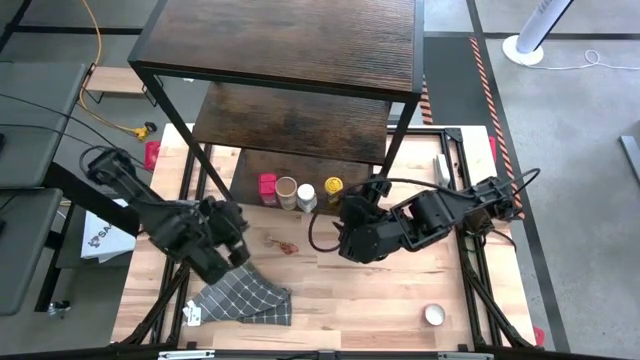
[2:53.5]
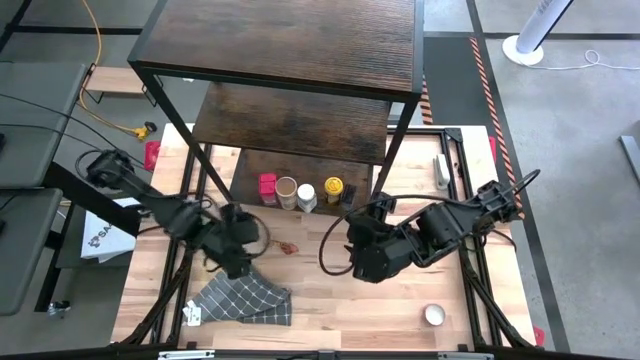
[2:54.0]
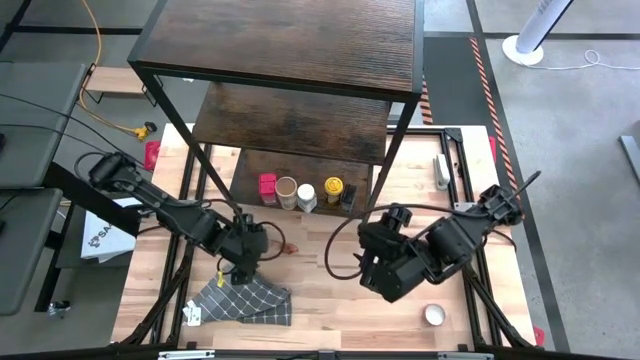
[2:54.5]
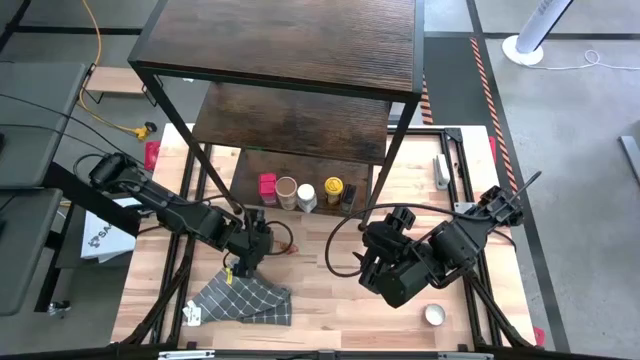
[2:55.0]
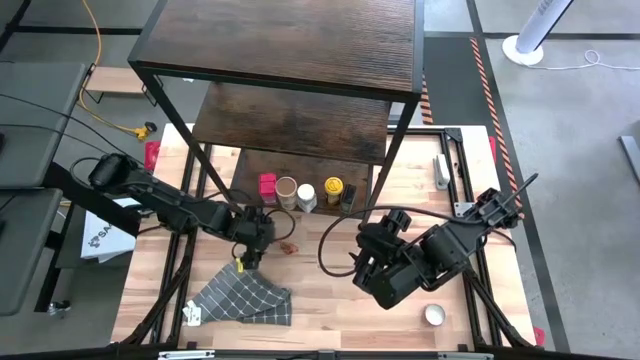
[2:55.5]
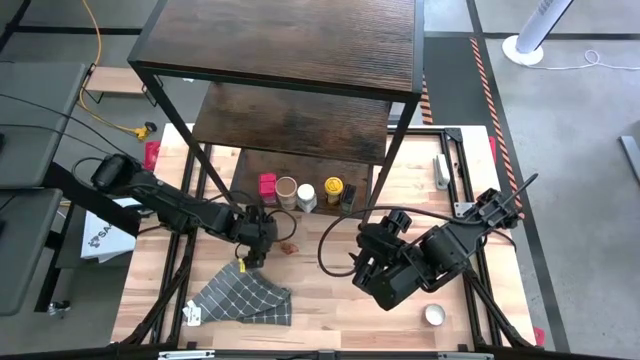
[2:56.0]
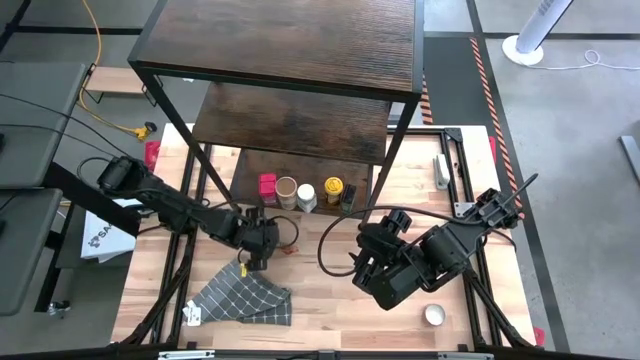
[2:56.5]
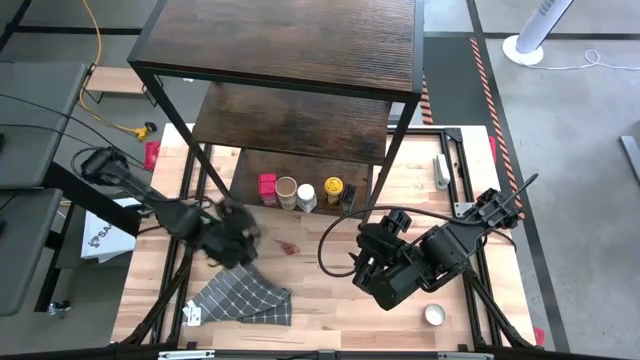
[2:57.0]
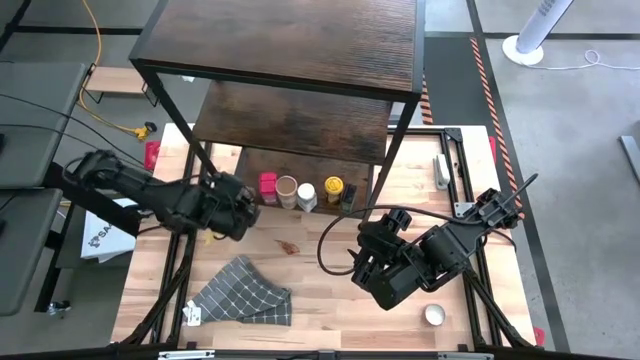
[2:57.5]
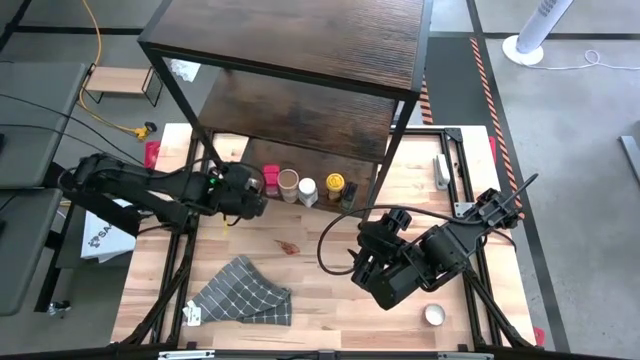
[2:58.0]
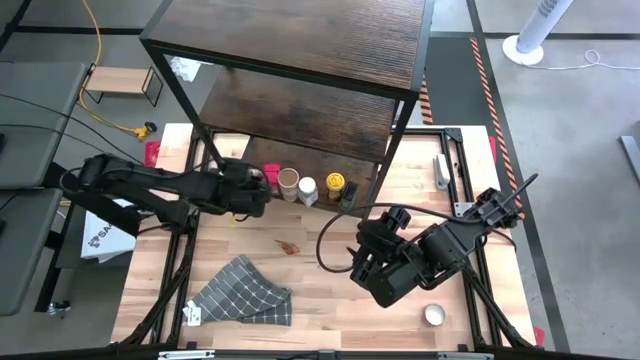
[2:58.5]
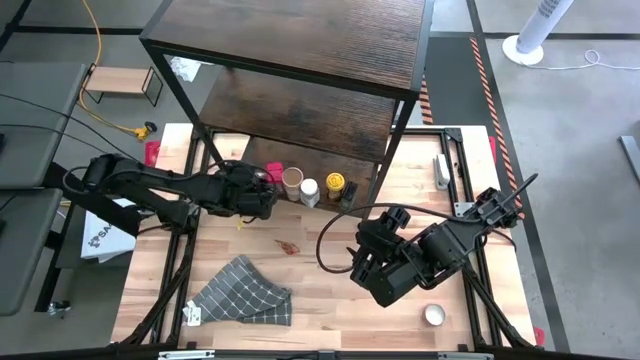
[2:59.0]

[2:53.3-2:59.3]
Task: Shelf spices
Put the brown seasoning bottle on the shelf

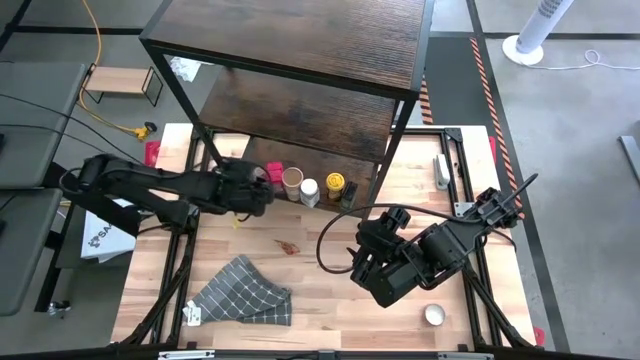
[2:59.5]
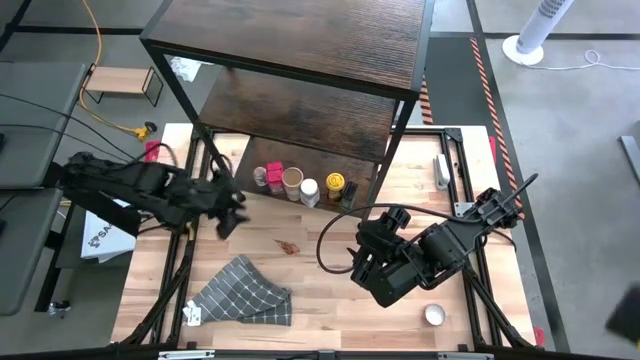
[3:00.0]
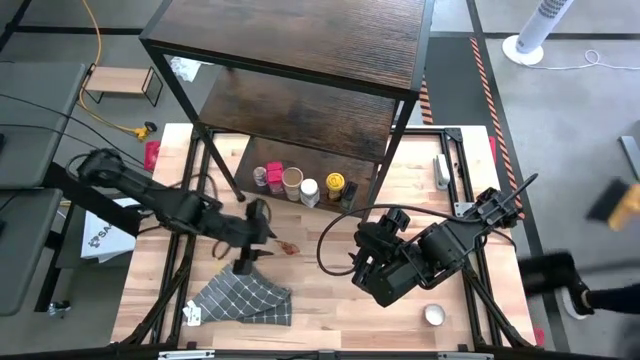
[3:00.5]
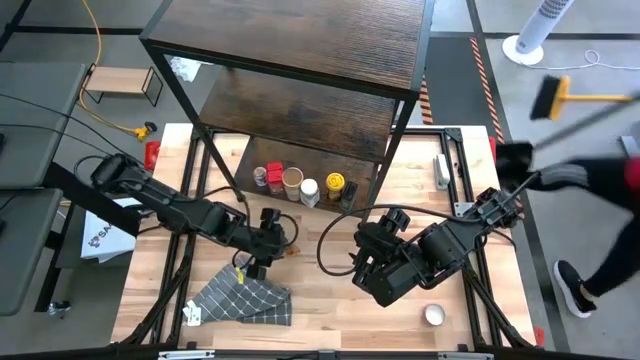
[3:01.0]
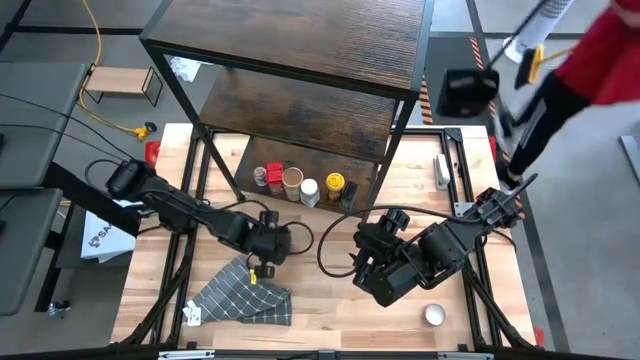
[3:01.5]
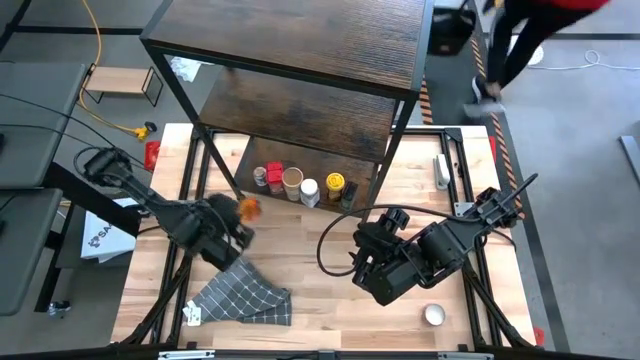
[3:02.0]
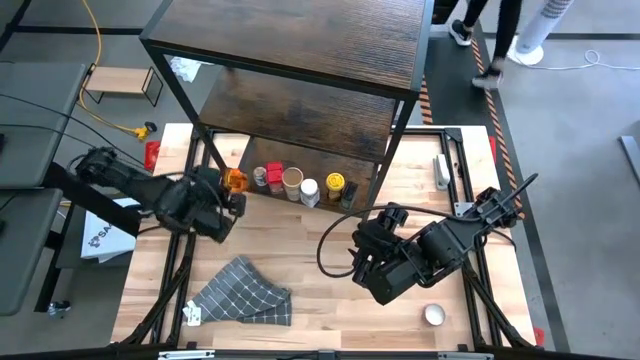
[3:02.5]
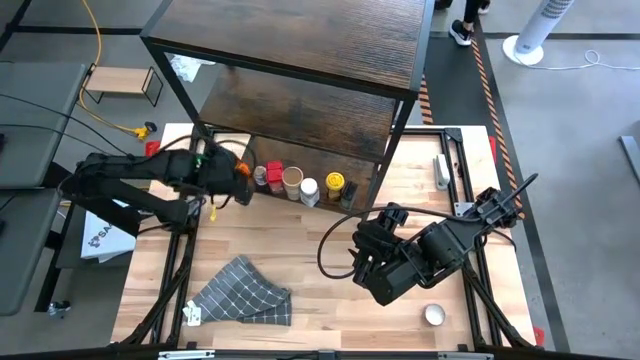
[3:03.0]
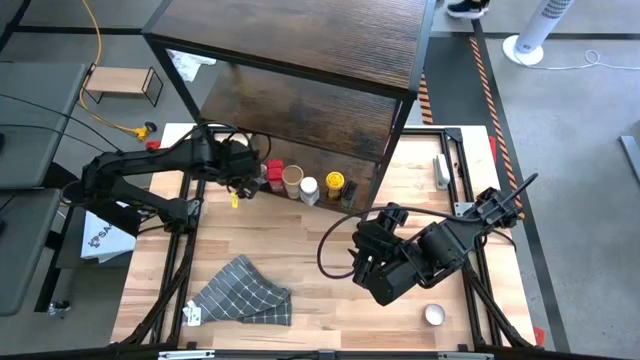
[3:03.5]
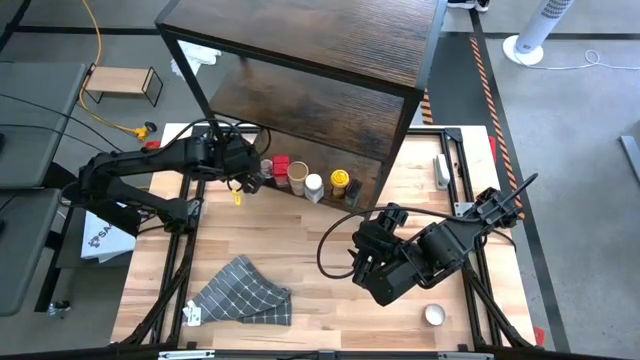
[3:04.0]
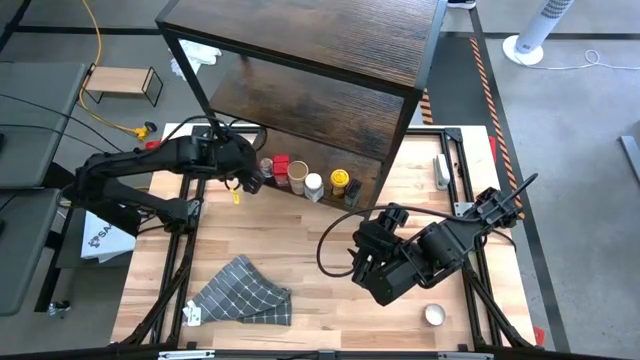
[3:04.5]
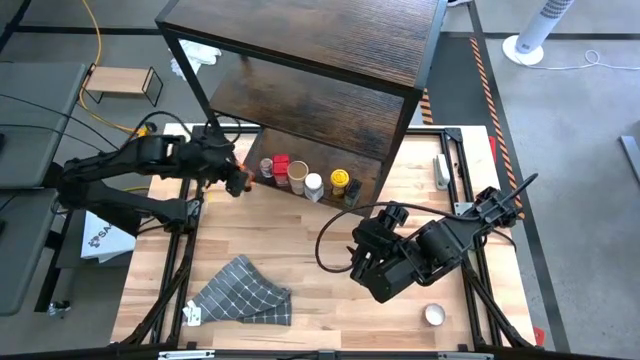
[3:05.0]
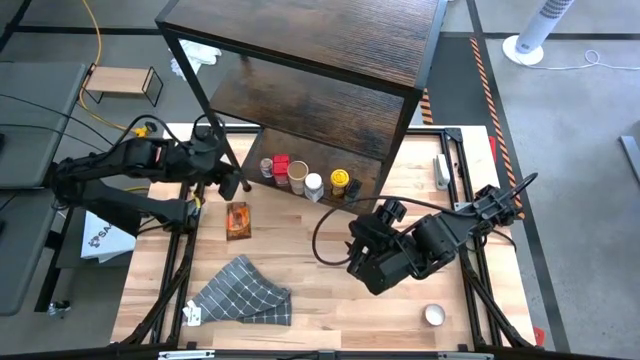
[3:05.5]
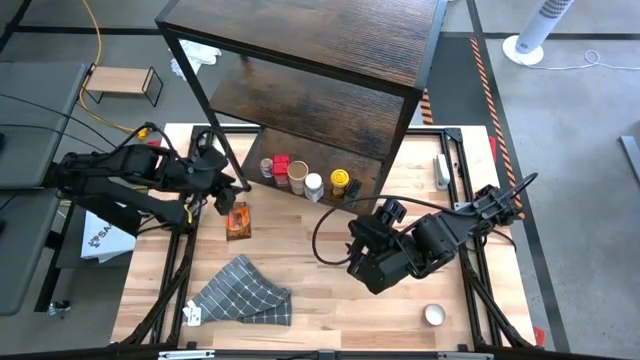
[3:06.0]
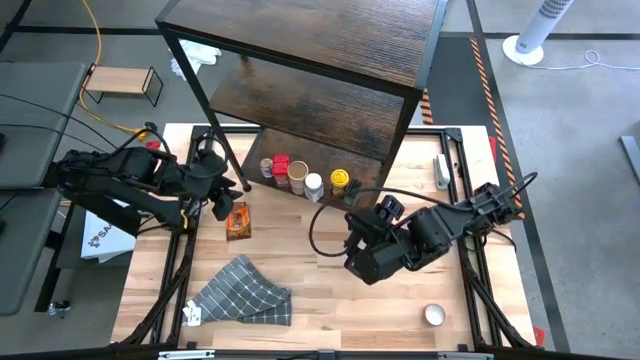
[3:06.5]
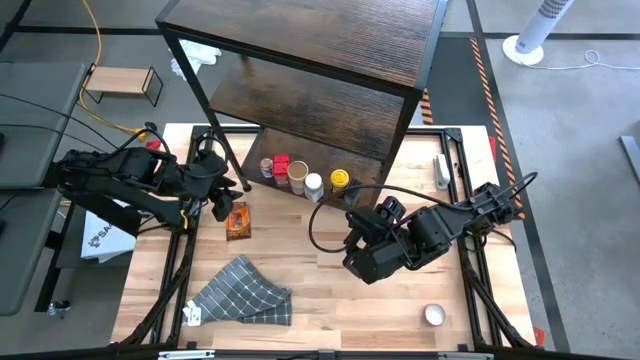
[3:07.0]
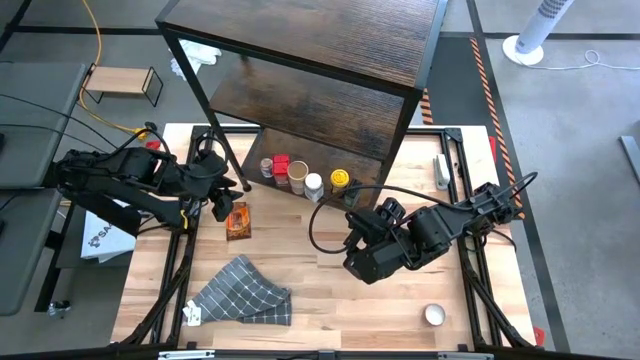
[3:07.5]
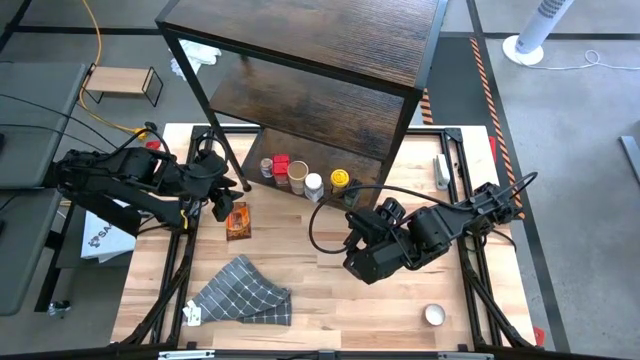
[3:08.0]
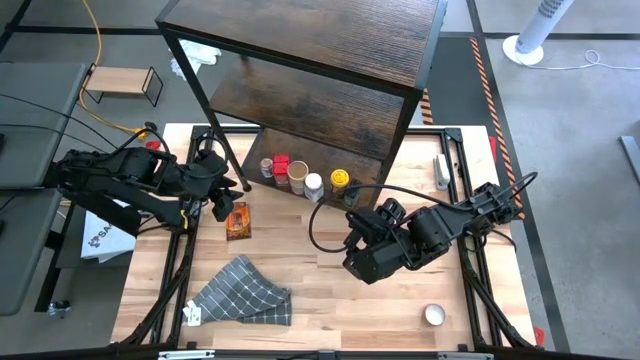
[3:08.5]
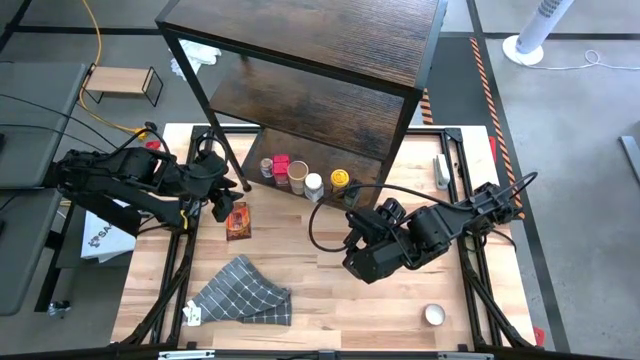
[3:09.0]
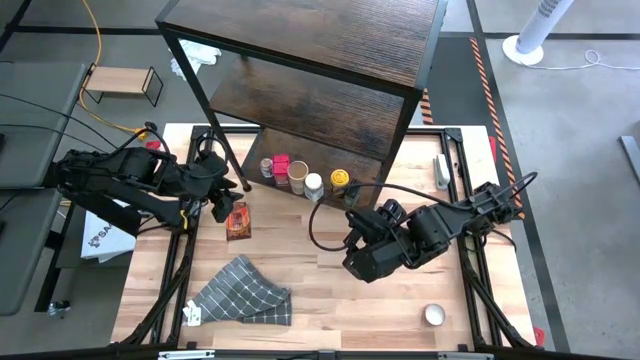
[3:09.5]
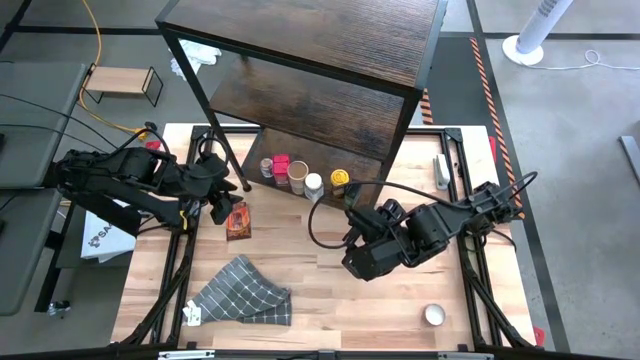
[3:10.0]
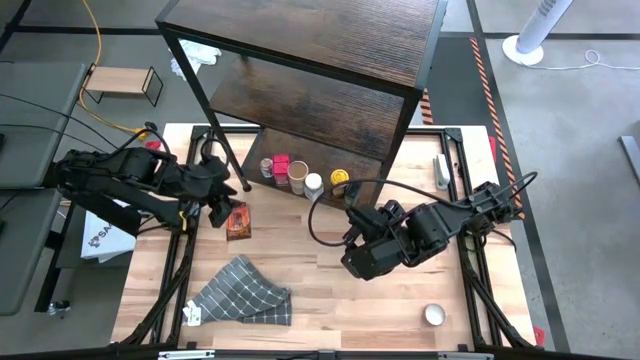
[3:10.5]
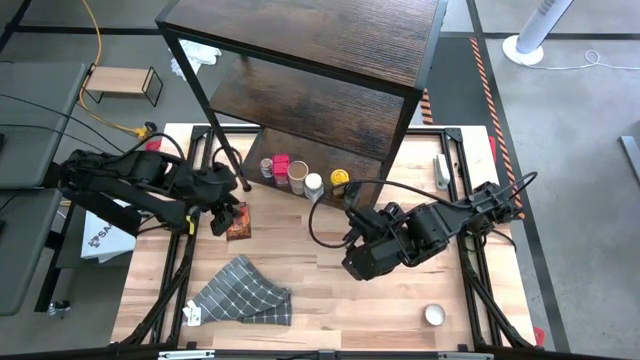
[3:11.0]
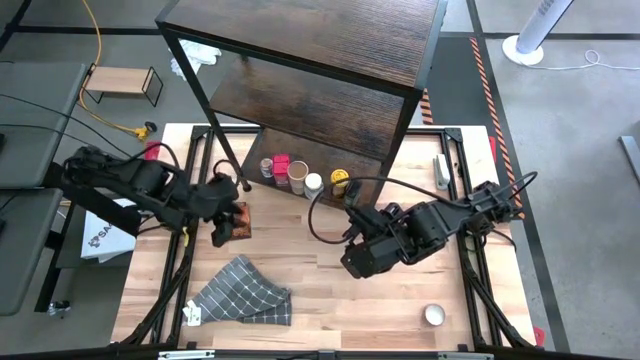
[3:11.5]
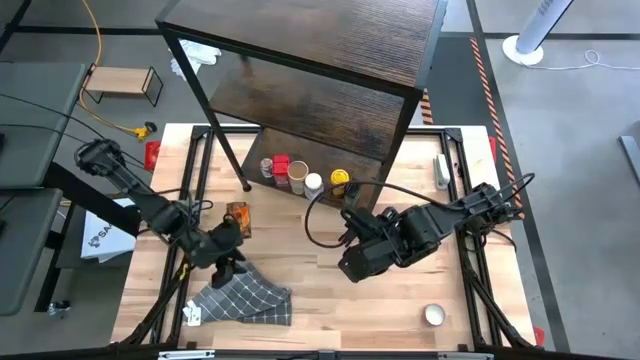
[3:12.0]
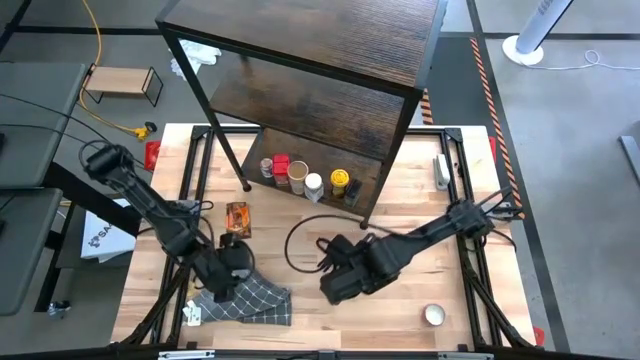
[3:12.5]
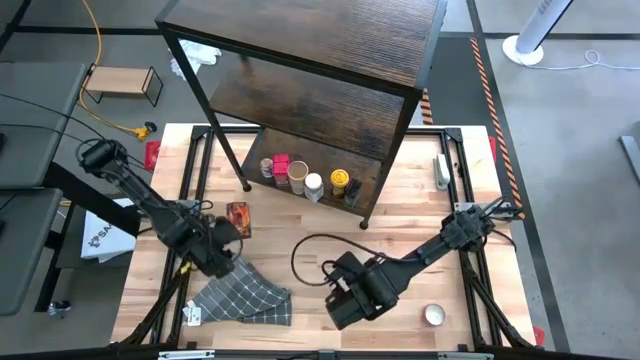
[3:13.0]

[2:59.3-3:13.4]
Put the orange seasoning pack on the shelf
